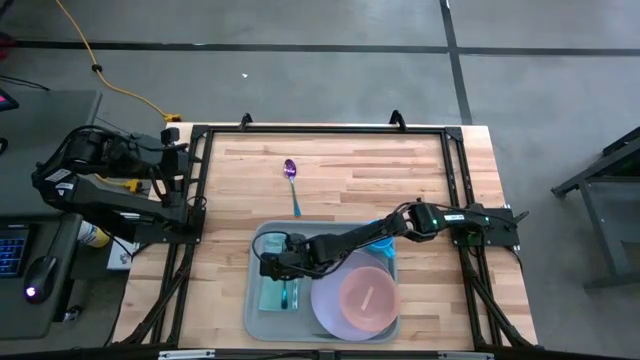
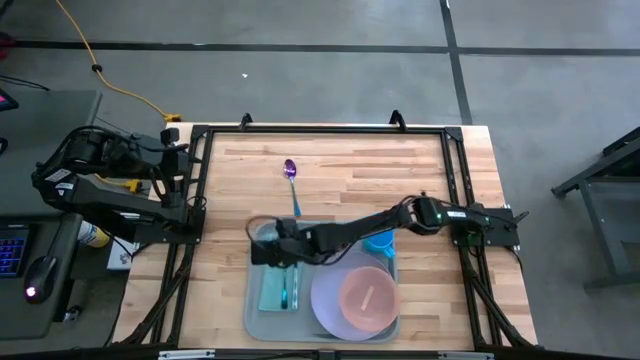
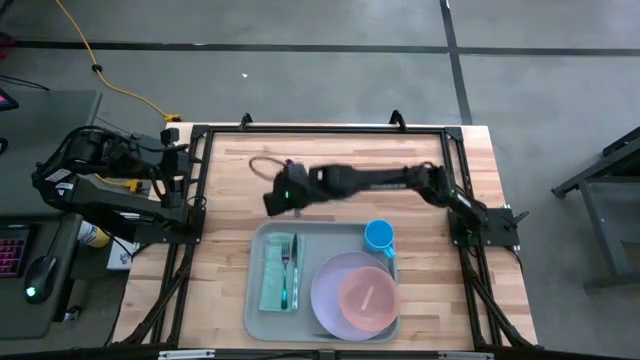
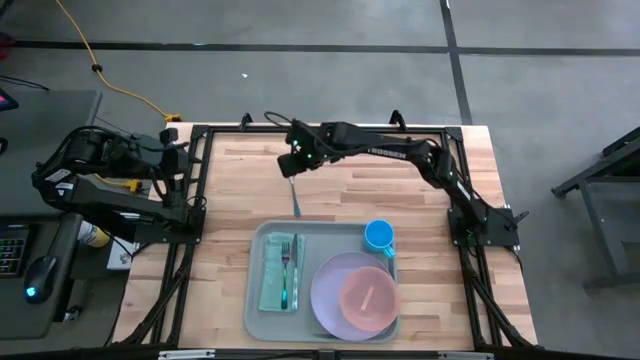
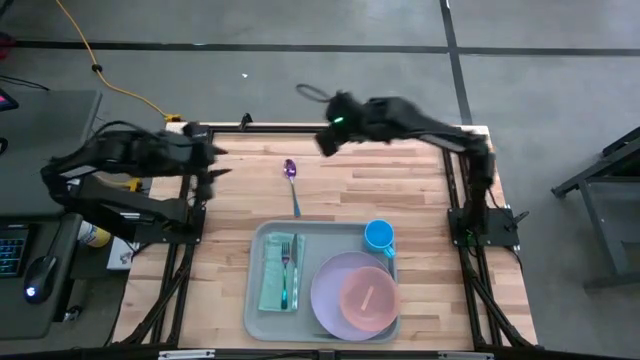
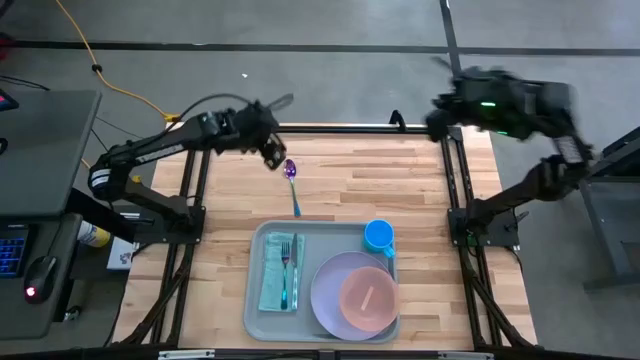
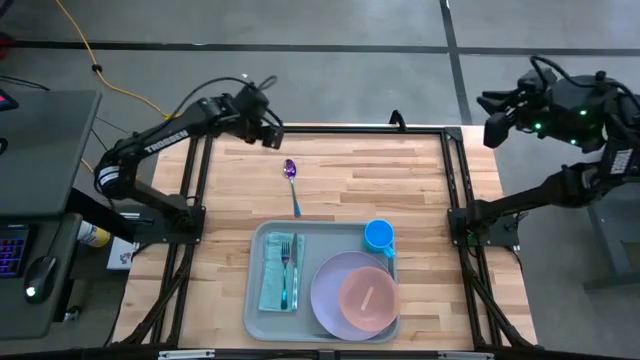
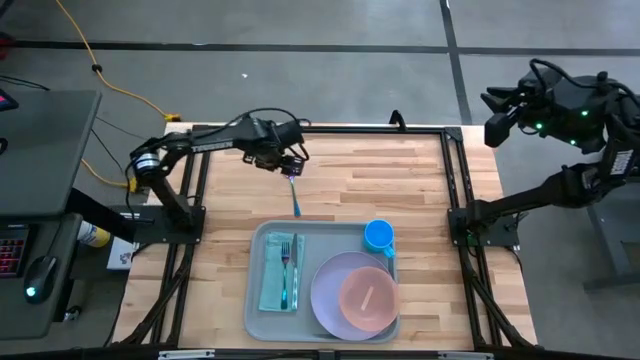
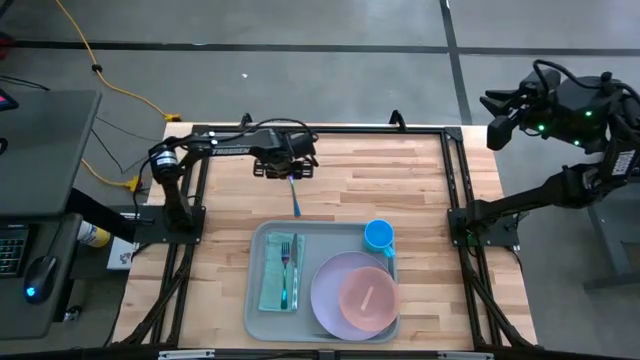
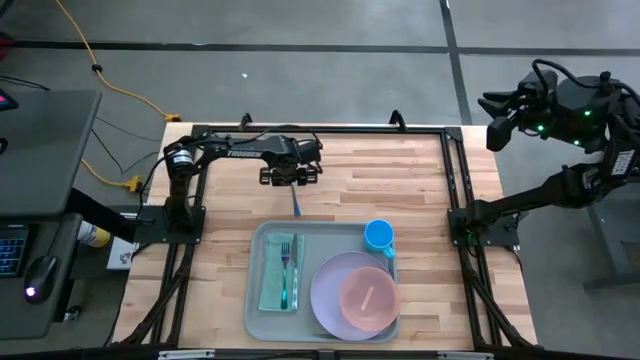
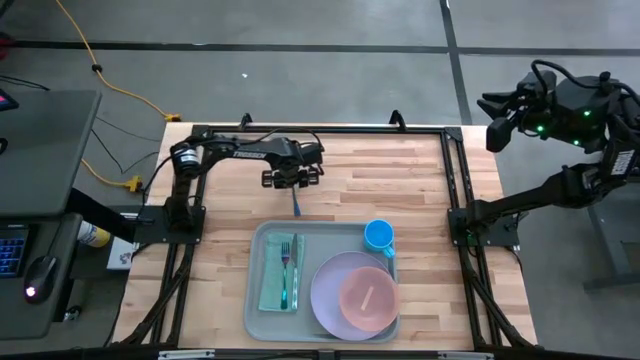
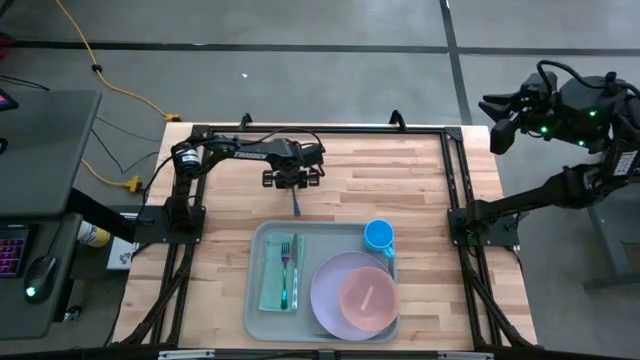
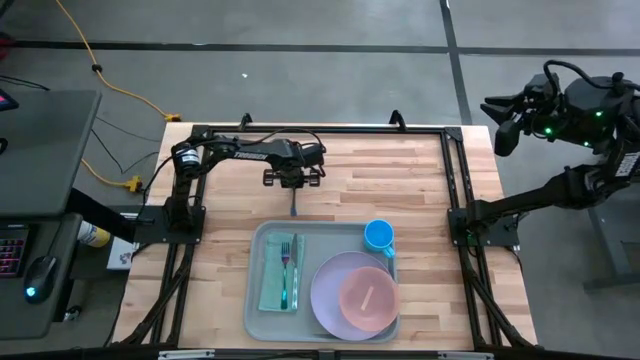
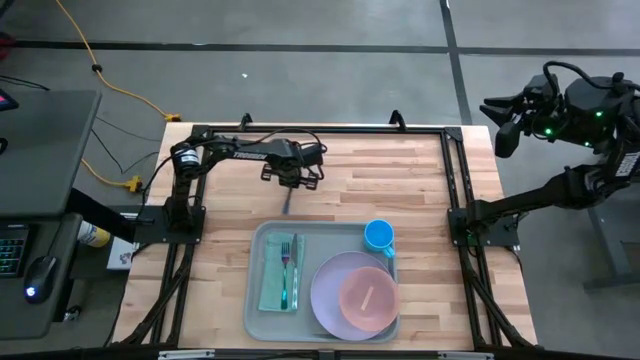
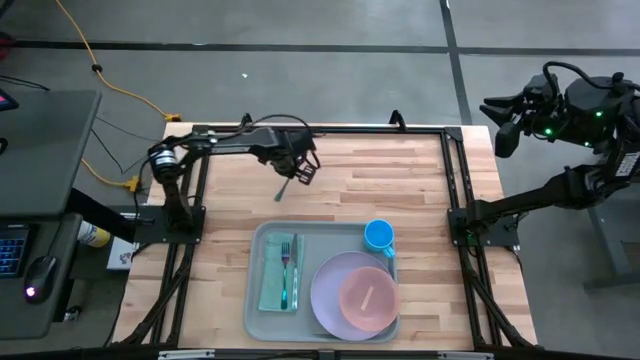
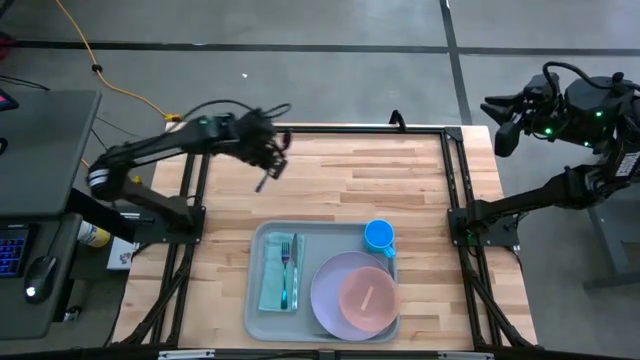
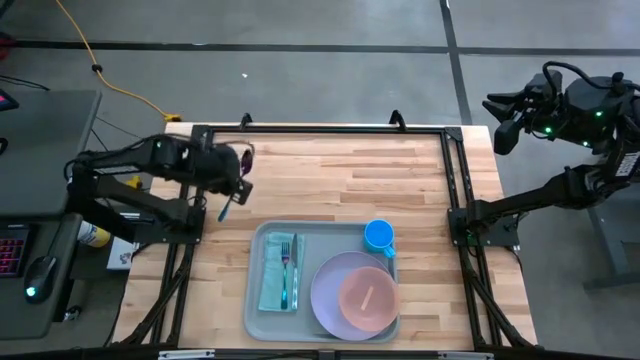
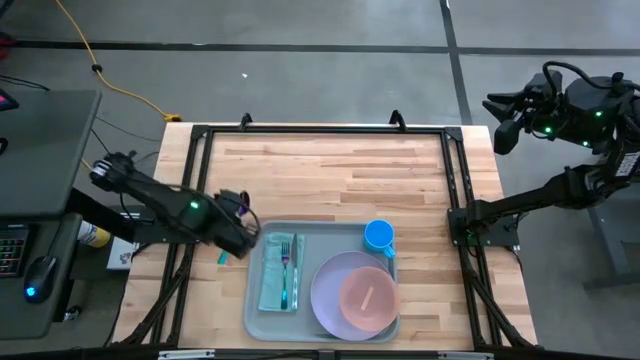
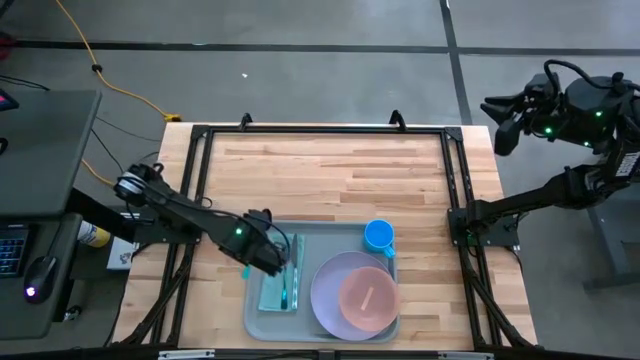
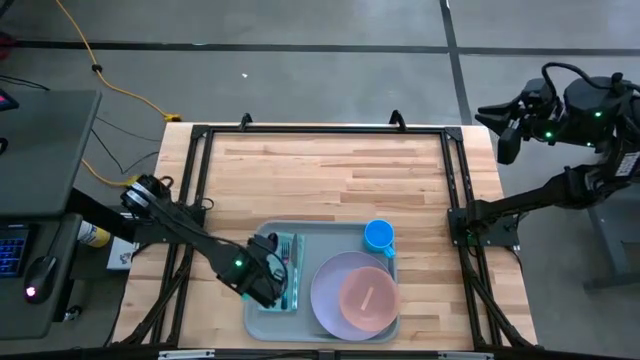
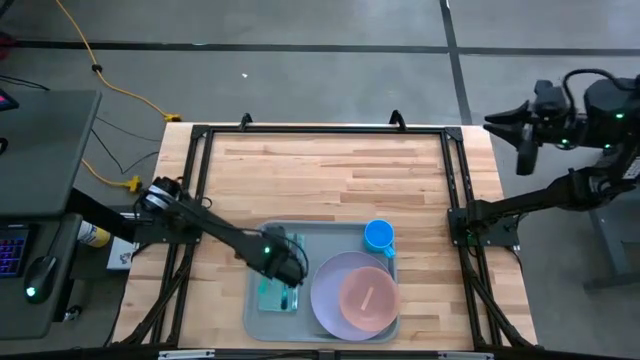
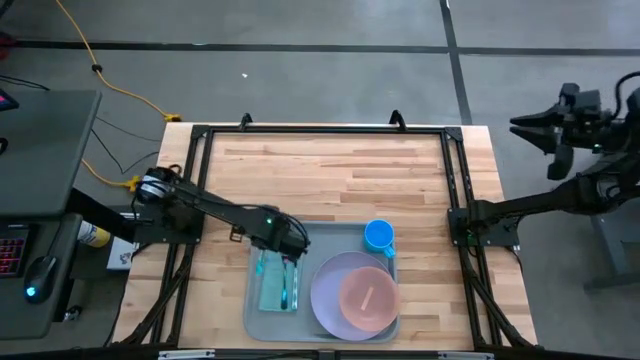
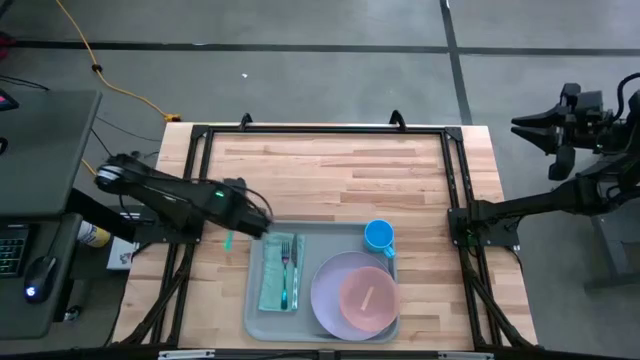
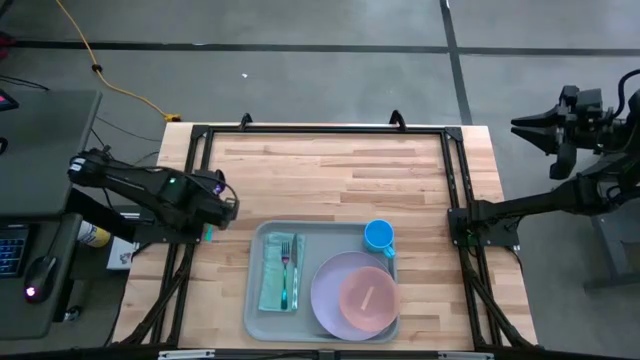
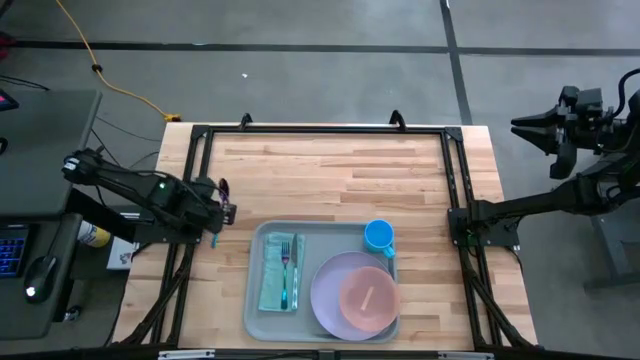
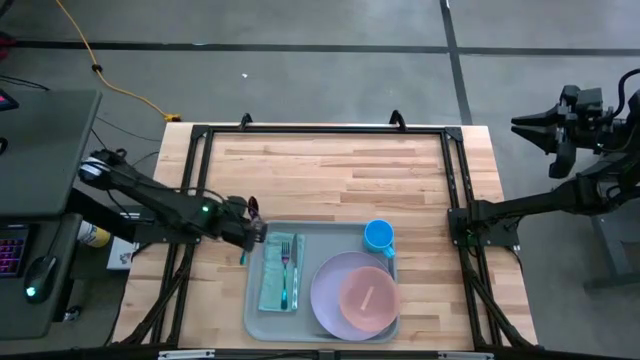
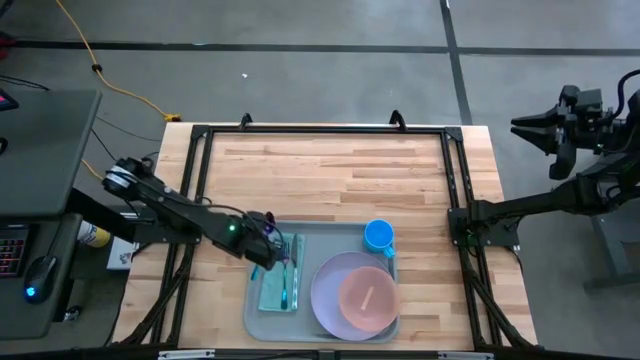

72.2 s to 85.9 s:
Task: Set up tray
Put the violet spoon on the light green table napkin to the left of the violet fork

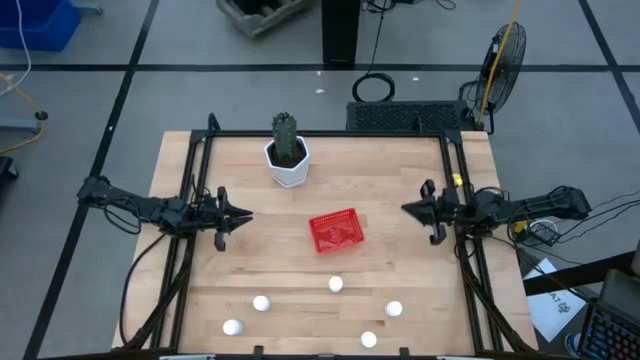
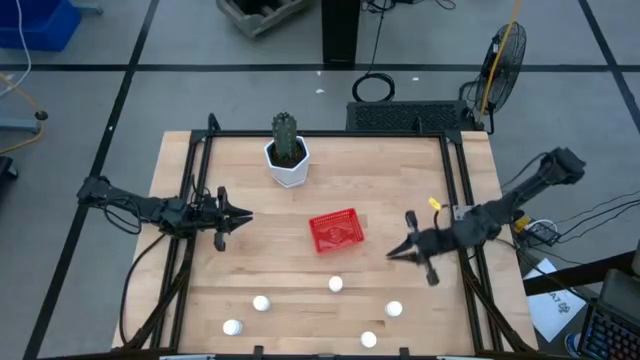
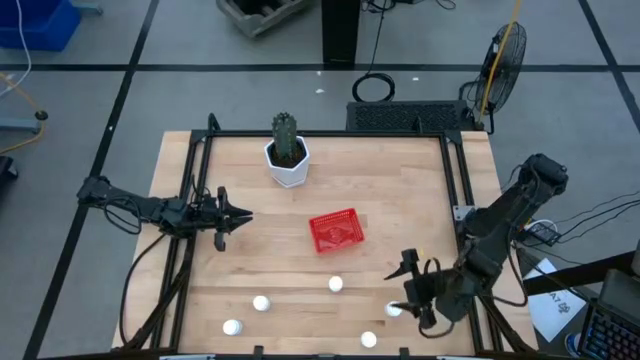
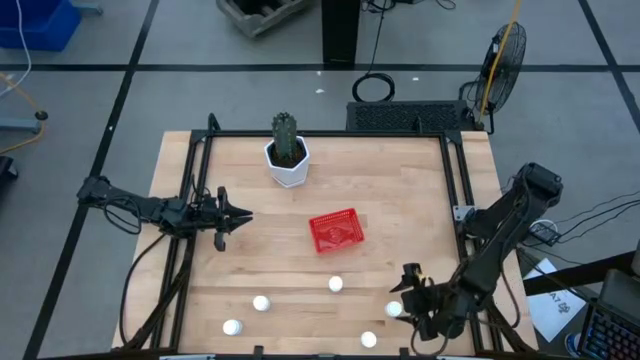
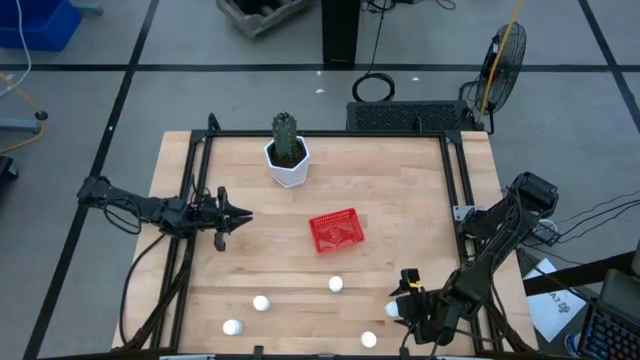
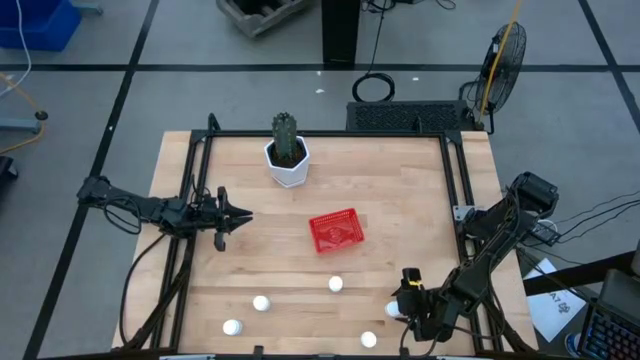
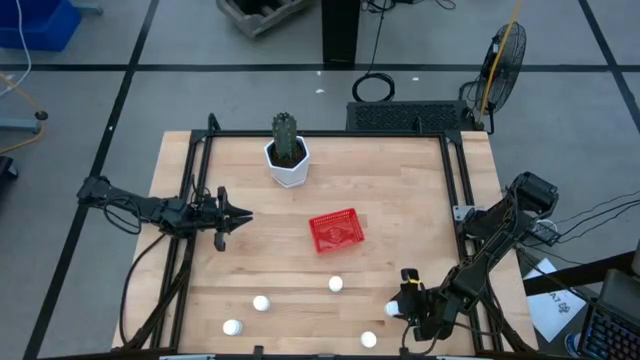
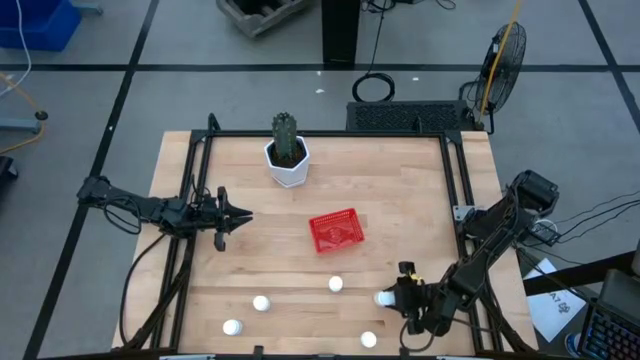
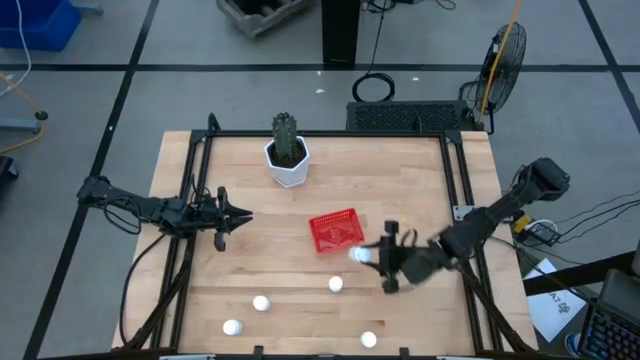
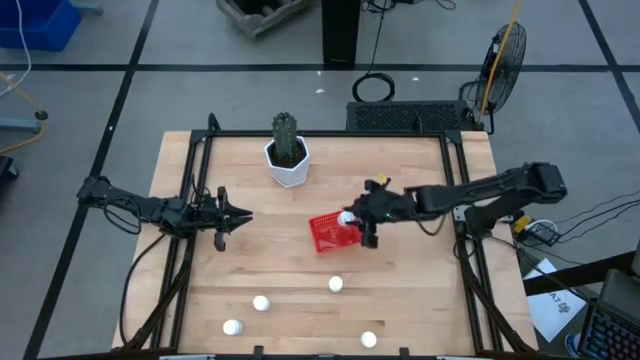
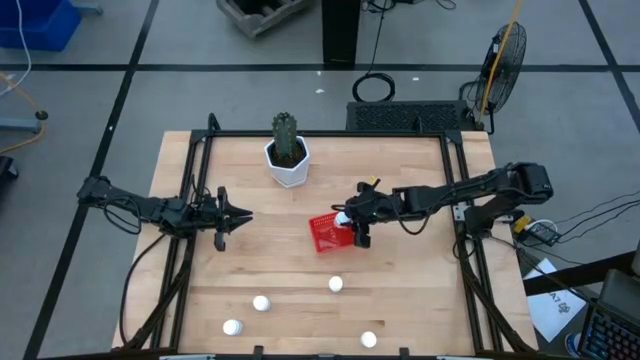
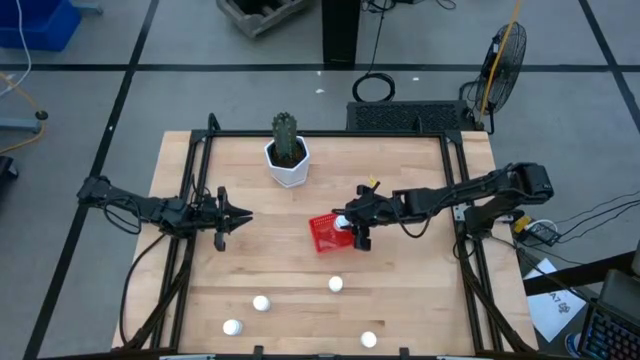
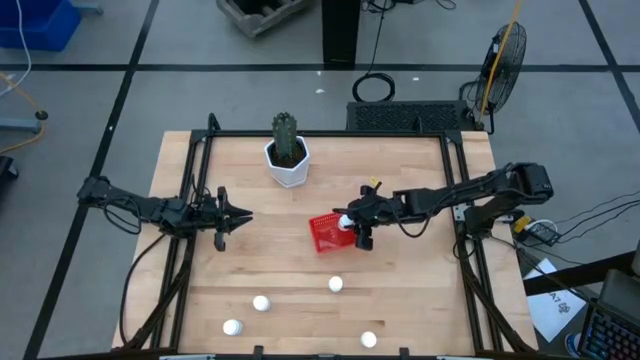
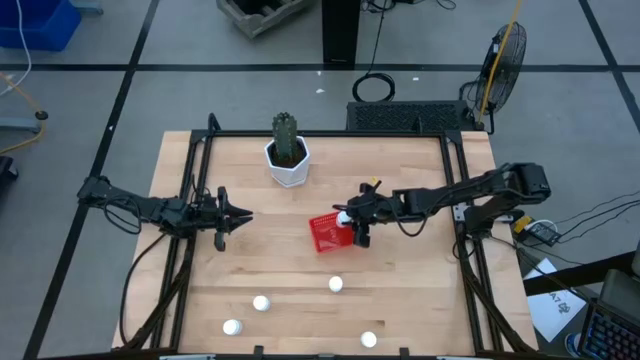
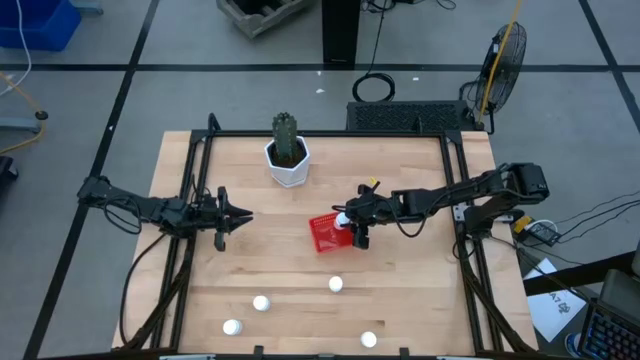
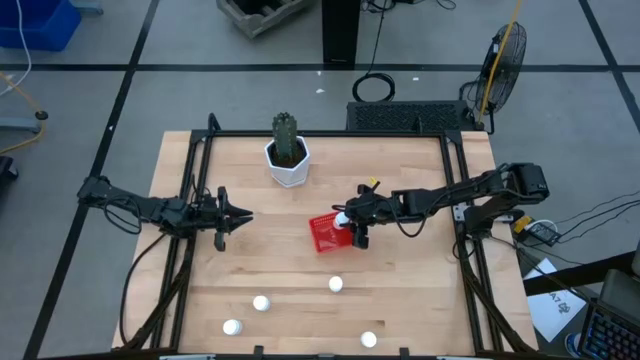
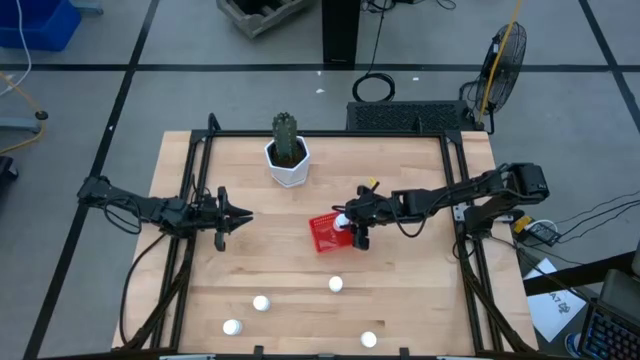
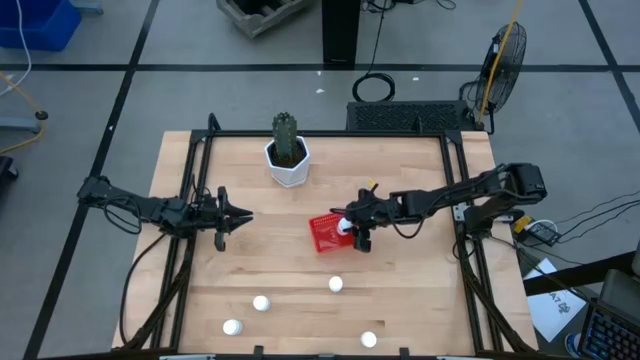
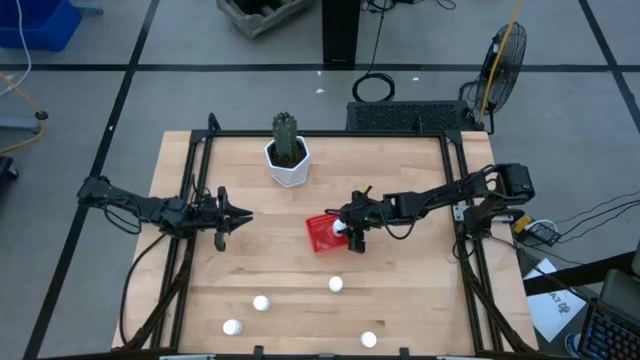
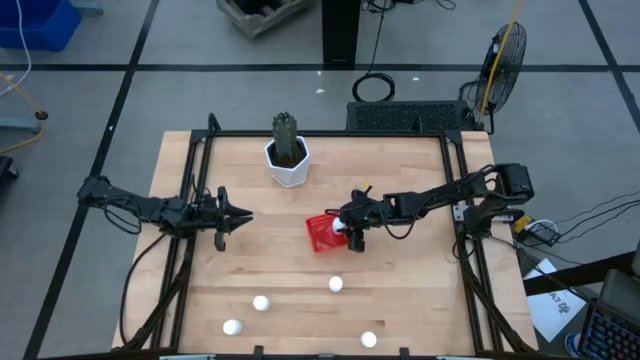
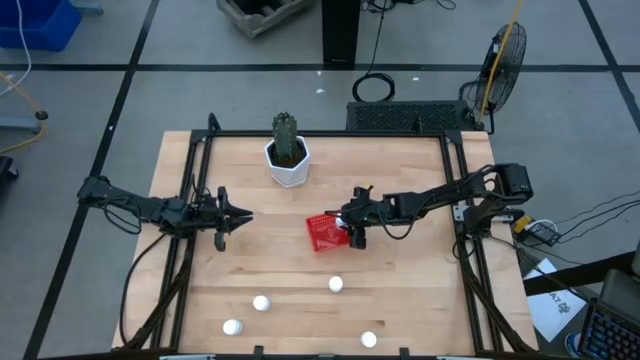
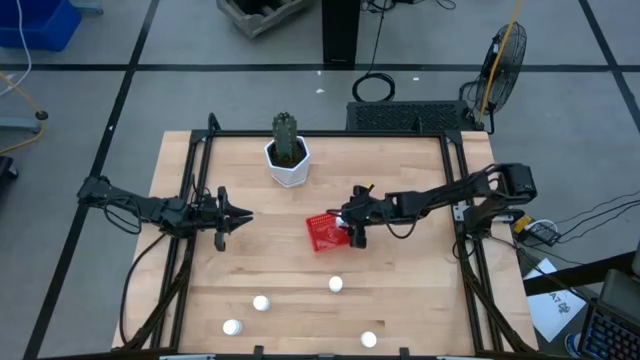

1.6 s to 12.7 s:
Task: Pick and place pill bottles into a basket
Put the white medicine bottle into the red bin
